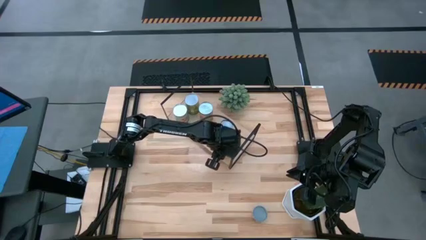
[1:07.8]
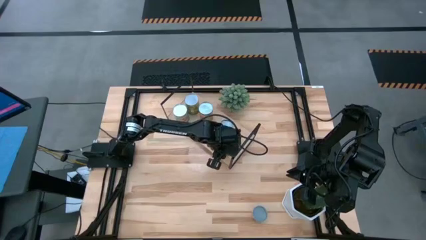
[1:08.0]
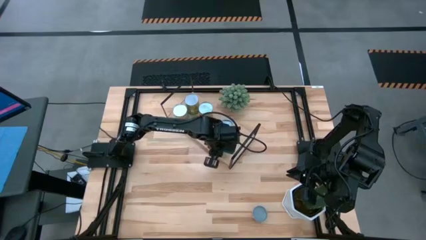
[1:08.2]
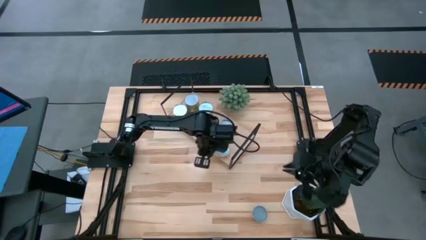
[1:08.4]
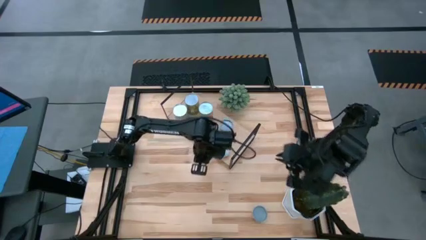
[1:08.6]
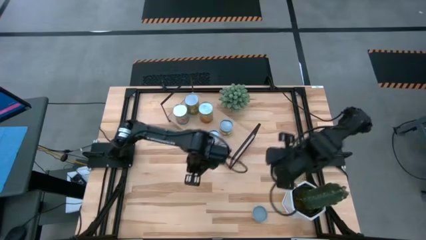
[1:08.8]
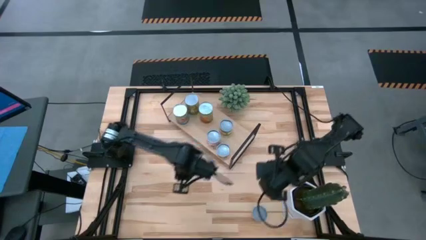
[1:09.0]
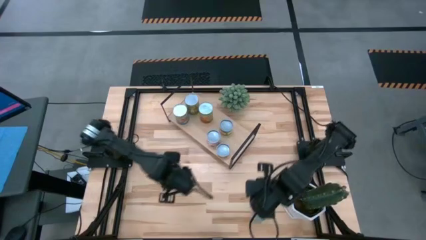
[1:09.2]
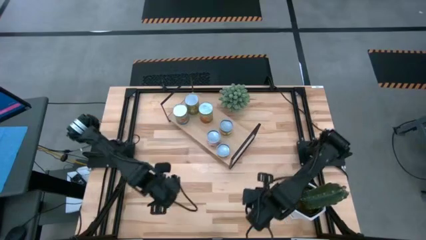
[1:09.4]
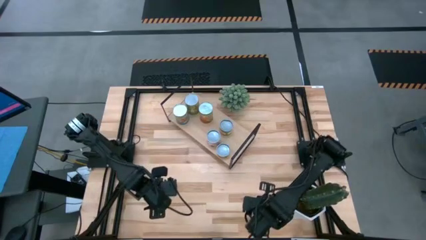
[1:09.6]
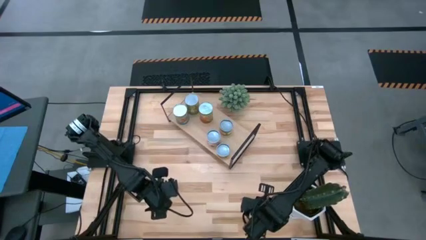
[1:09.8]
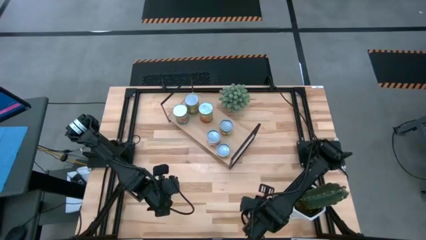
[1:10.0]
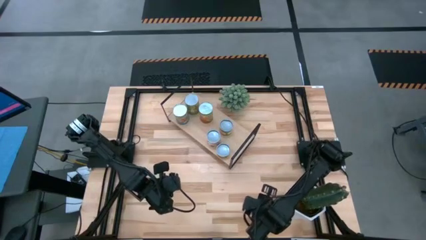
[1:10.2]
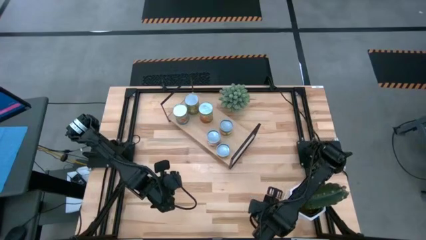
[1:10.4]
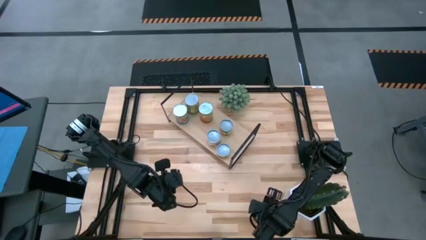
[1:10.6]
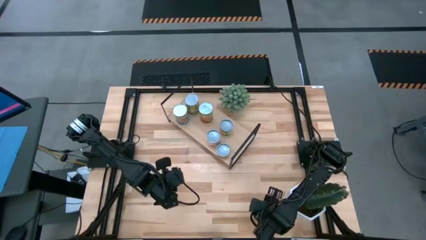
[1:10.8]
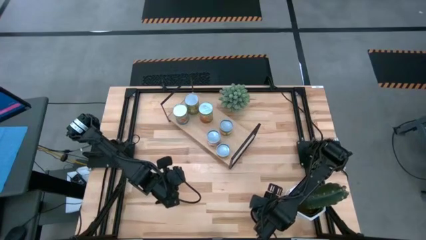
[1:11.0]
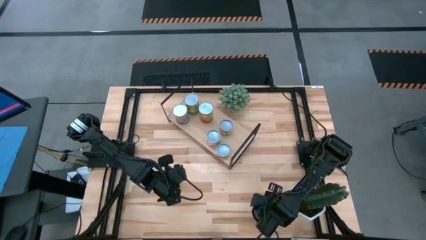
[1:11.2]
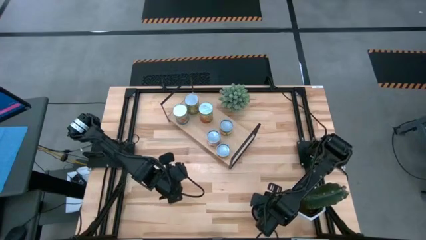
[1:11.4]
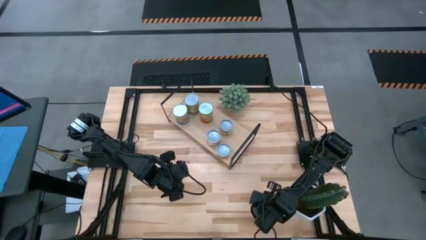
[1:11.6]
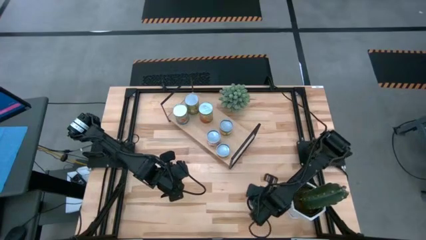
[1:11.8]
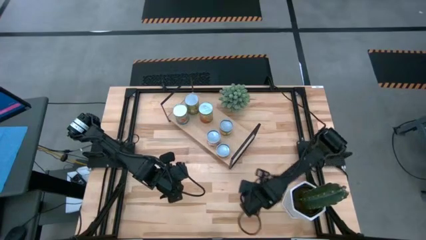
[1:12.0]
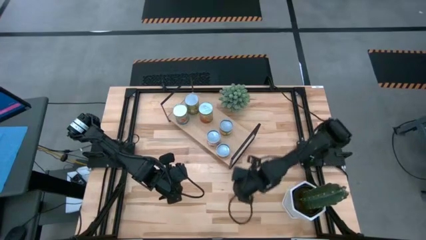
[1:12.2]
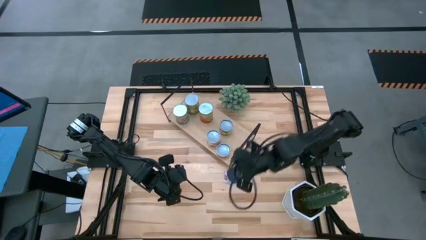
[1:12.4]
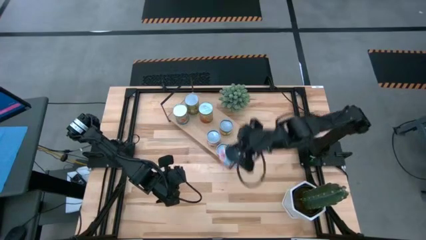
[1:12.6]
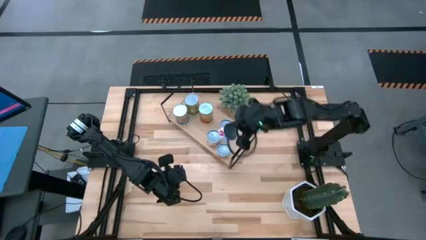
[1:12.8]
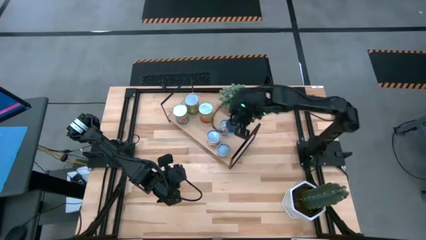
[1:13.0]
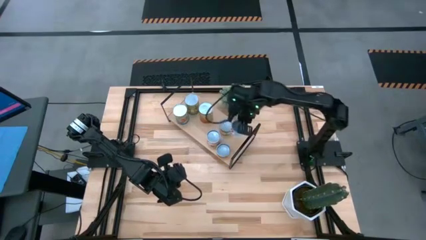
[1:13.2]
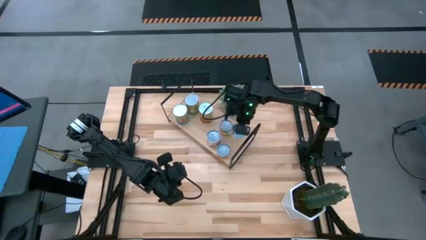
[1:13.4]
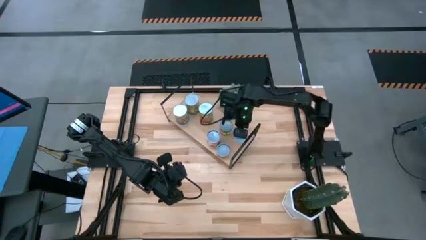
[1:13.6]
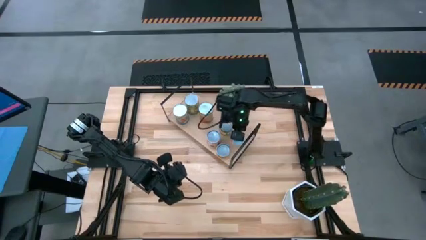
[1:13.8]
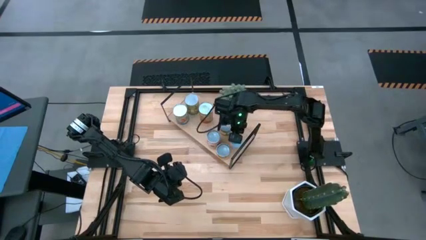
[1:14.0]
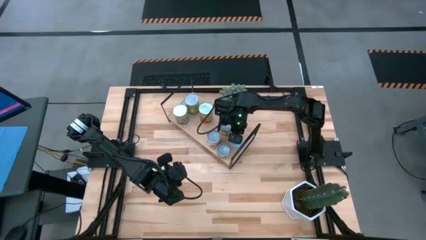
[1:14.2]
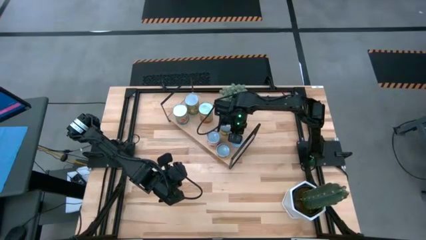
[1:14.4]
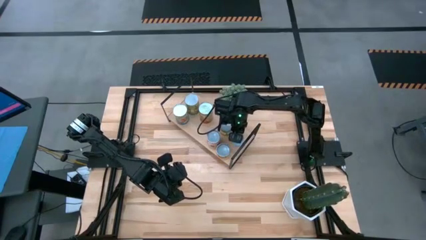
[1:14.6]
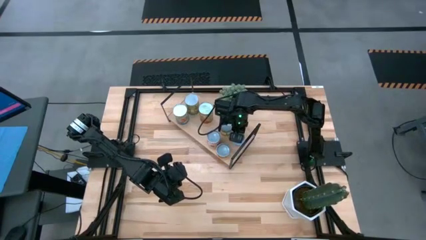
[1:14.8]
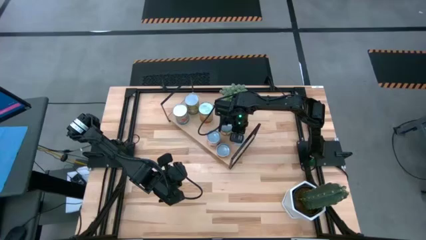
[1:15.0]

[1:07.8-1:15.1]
Task: Pick and place cans onto a shelf
Put the canned salmon on the shelf

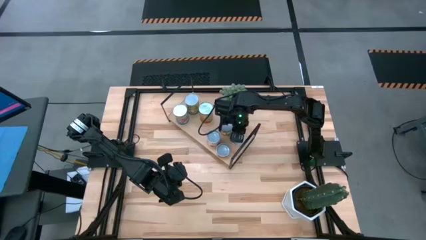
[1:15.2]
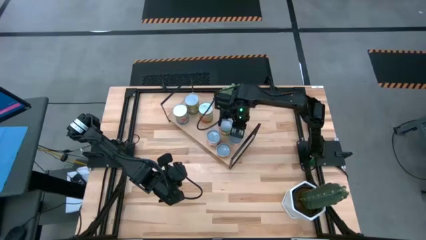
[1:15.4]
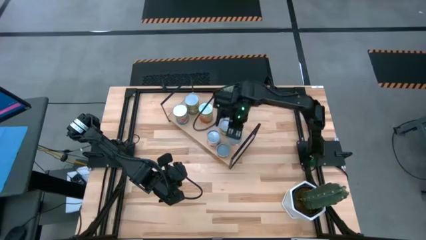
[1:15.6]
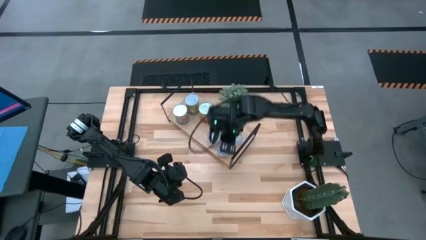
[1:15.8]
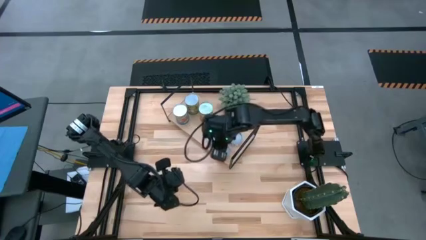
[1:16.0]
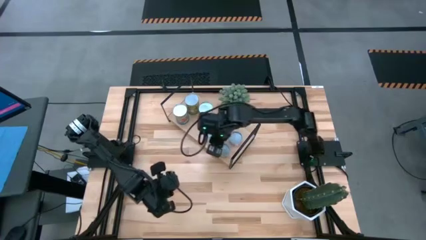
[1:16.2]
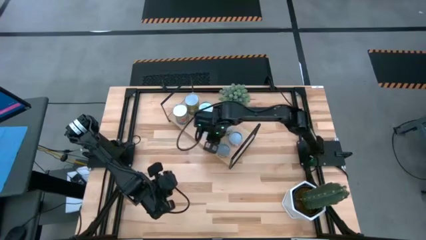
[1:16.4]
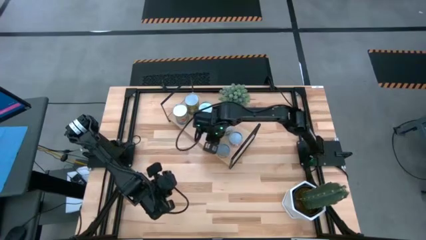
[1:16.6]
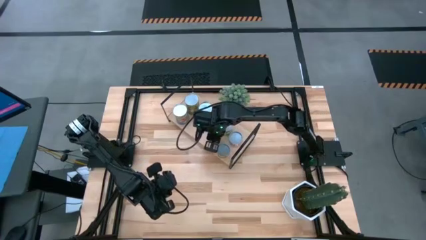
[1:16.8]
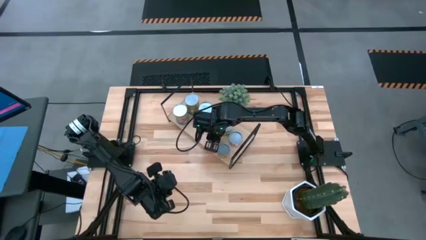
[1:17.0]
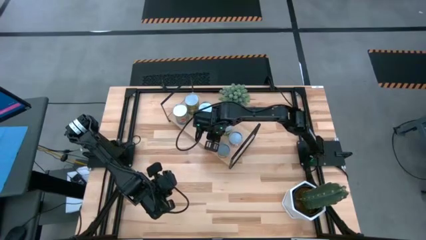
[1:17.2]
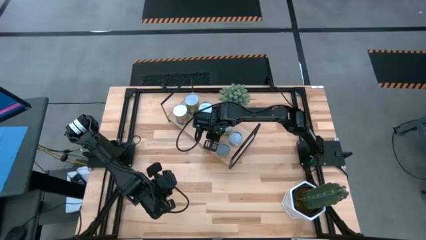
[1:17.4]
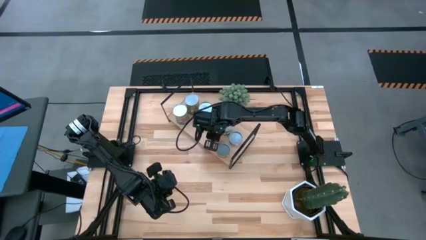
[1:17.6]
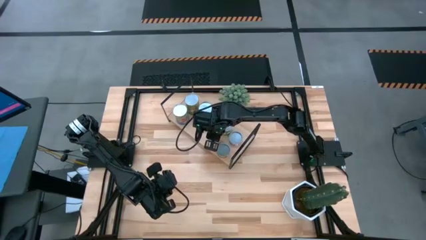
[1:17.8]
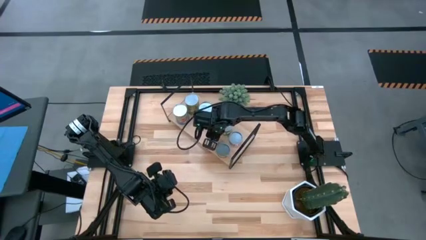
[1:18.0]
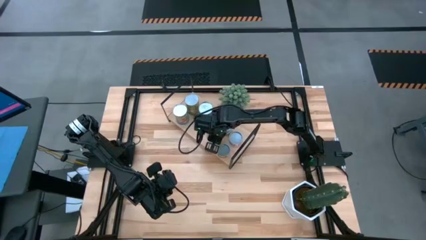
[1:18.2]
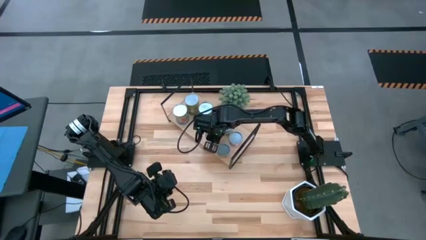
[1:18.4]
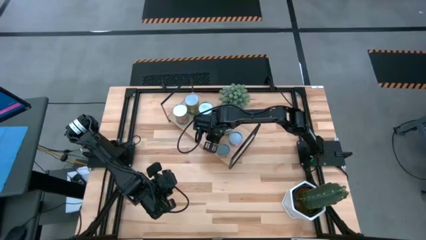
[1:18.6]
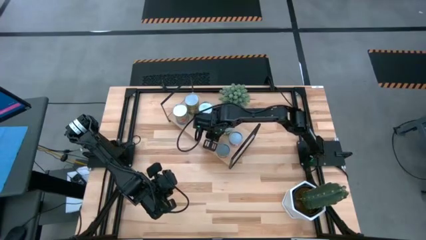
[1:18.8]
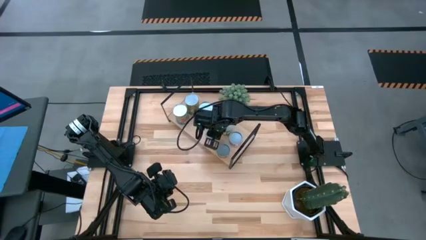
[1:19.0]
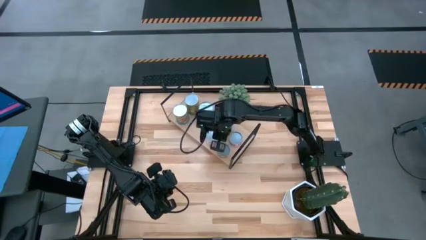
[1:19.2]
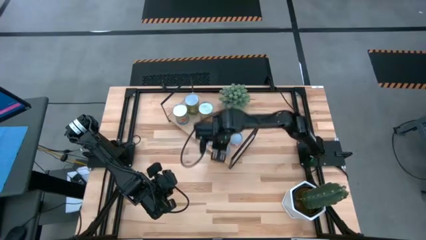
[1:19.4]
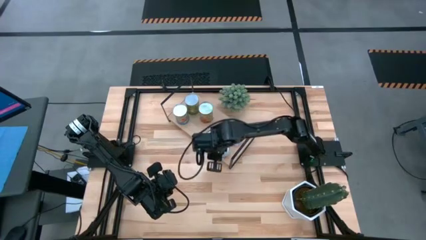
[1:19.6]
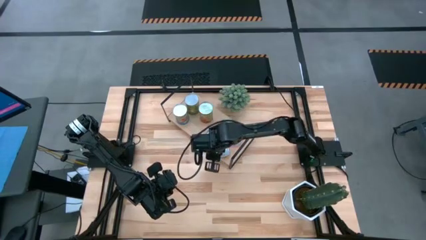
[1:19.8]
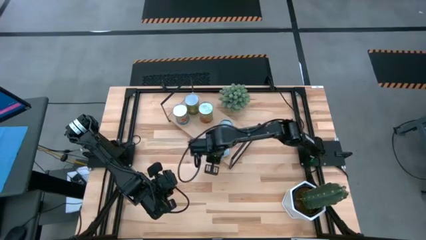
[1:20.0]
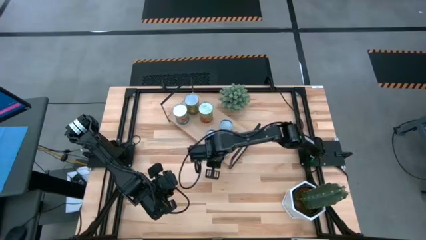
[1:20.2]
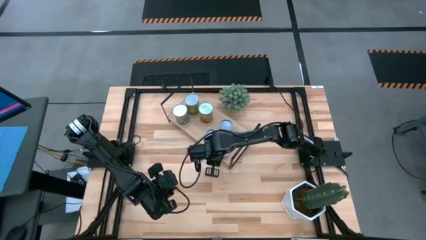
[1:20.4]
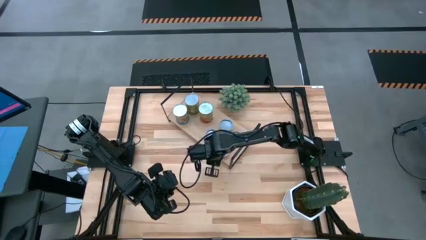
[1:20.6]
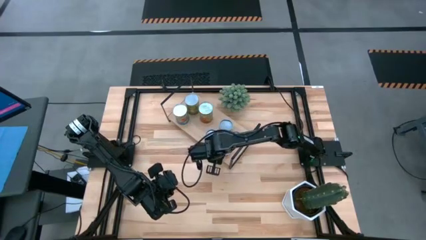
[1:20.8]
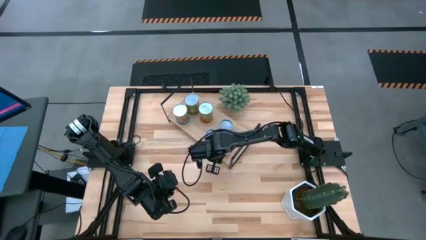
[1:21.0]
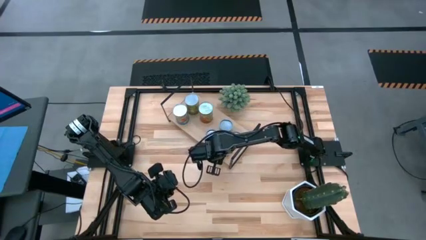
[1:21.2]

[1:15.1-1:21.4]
Adjust the canned goods on the shelf

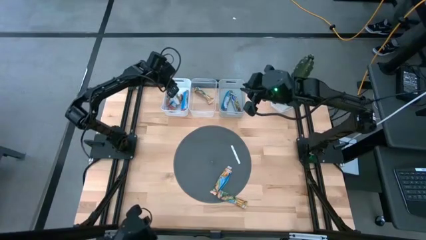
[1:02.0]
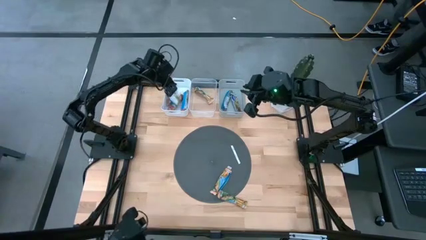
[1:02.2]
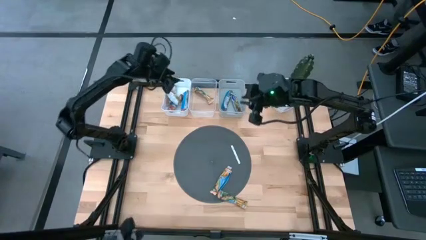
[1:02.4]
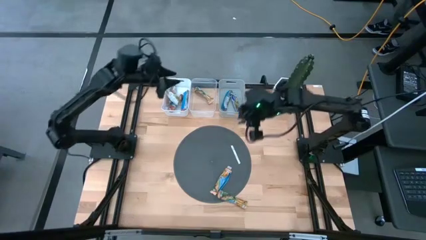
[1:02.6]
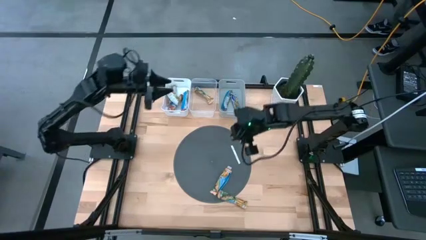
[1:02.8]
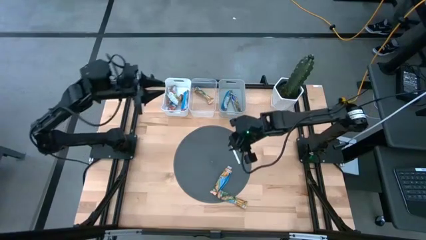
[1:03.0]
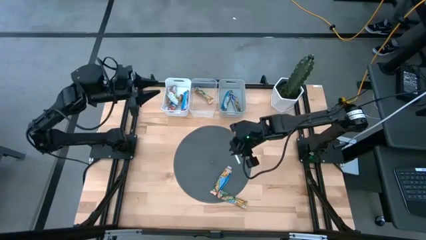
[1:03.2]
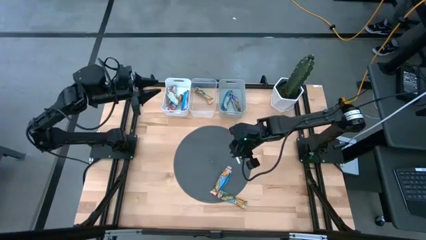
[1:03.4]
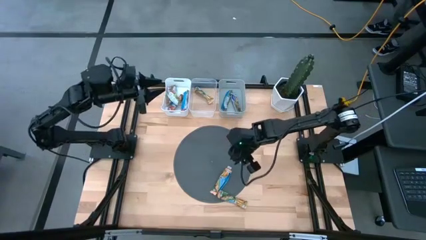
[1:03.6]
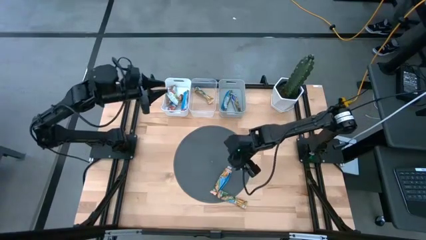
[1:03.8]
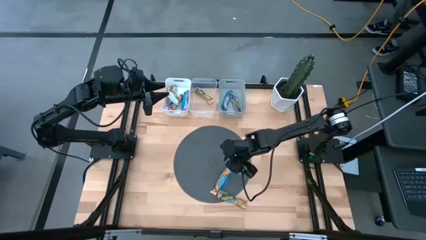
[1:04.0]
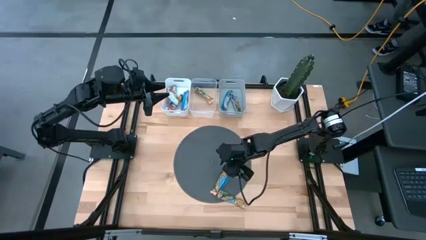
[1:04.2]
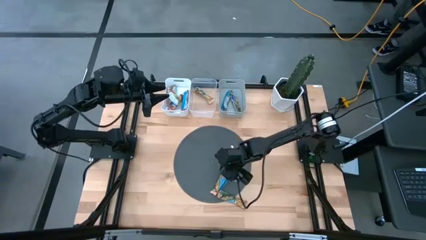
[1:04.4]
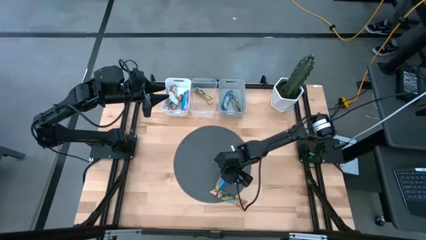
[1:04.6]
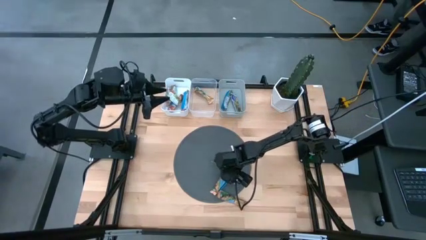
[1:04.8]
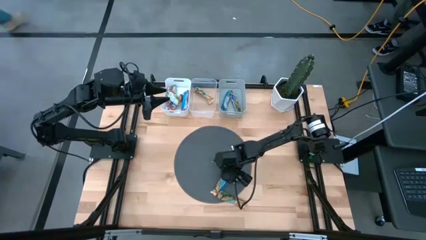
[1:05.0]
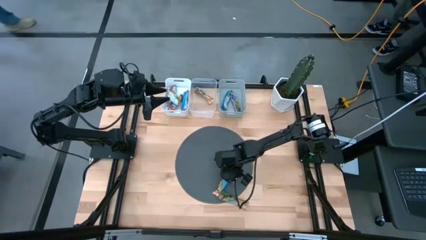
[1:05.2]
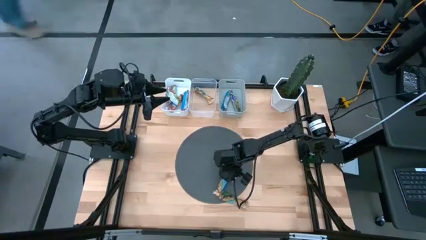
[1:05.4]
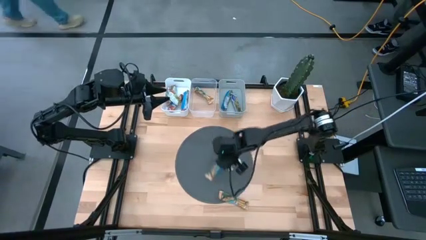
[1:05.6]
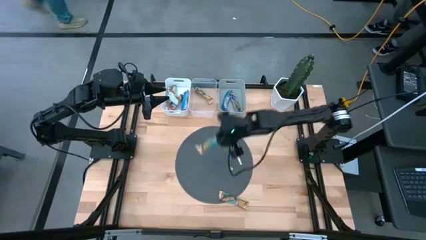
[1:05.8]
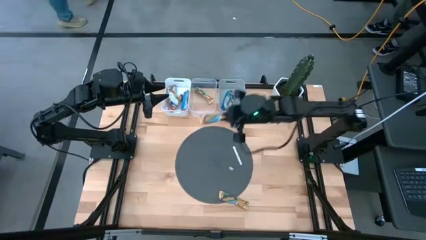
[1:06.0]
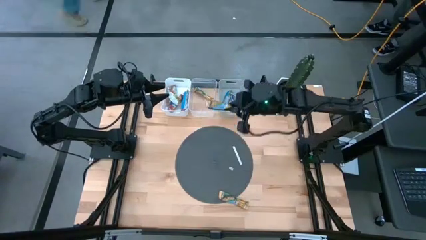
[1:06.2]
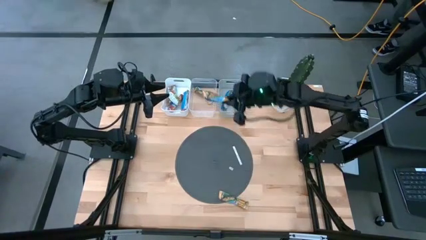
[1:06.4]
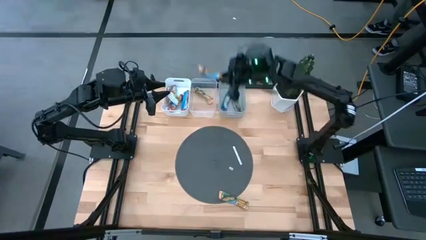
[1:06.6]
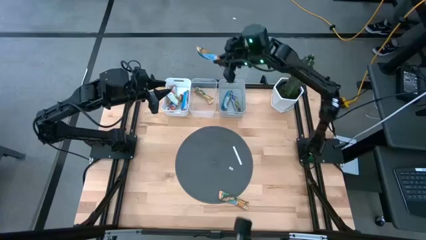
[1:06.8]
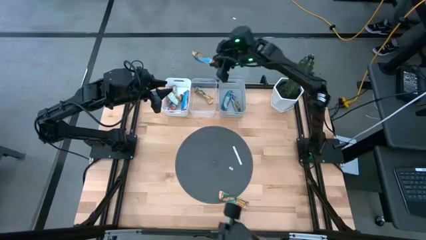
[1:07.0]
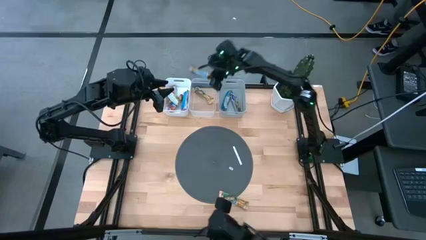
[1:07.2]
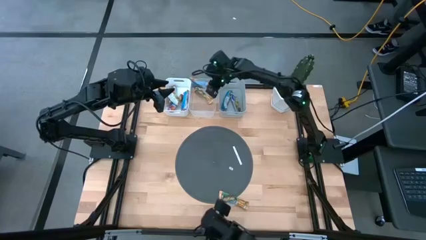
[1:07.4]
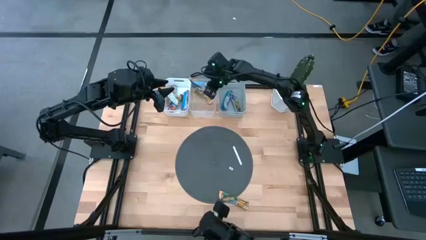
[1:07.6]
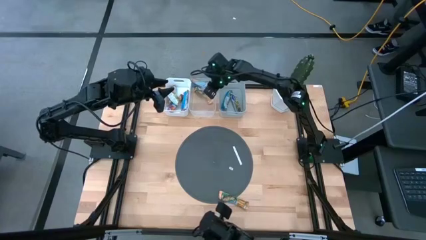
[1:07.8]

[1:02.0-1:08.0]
Task: Pick and place Granola Bars by type
Put the yellow granola bar into the transparent bin
